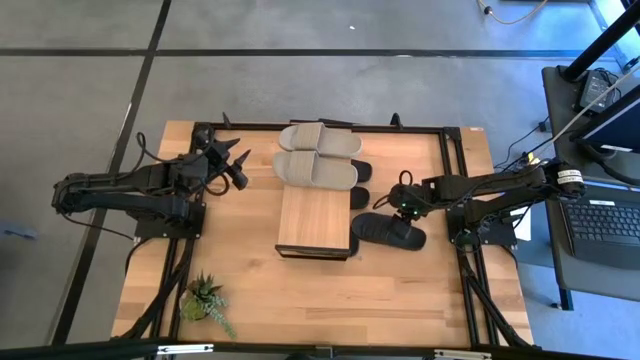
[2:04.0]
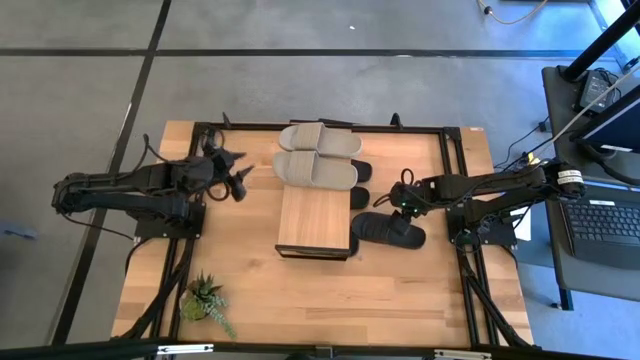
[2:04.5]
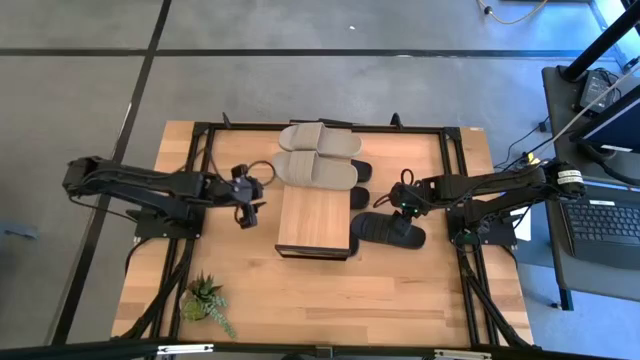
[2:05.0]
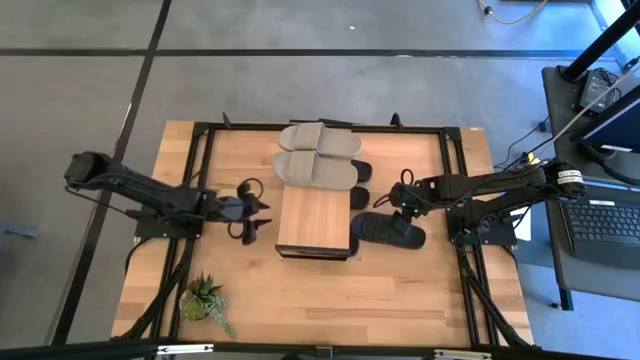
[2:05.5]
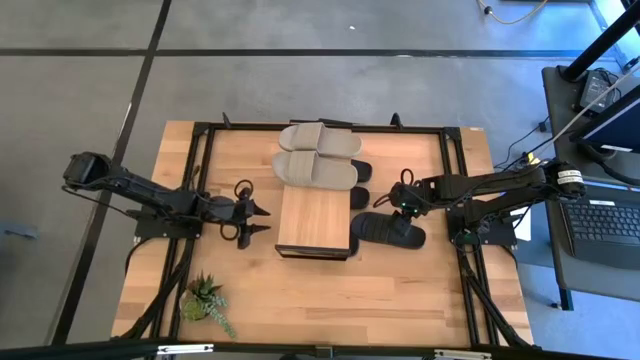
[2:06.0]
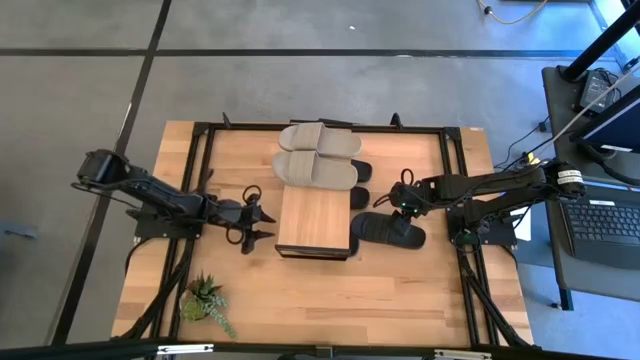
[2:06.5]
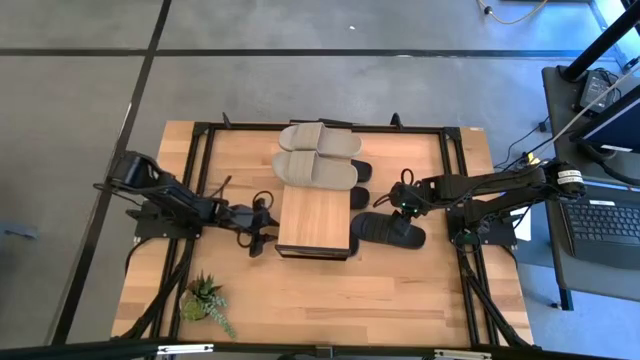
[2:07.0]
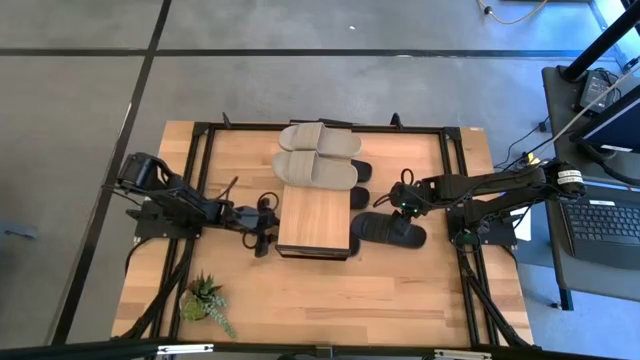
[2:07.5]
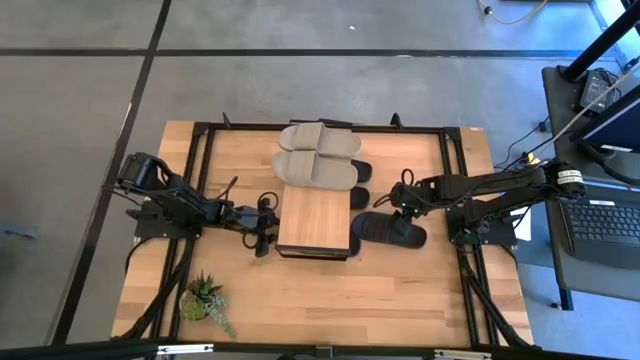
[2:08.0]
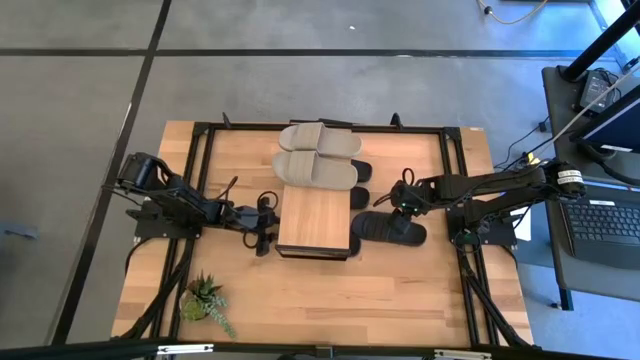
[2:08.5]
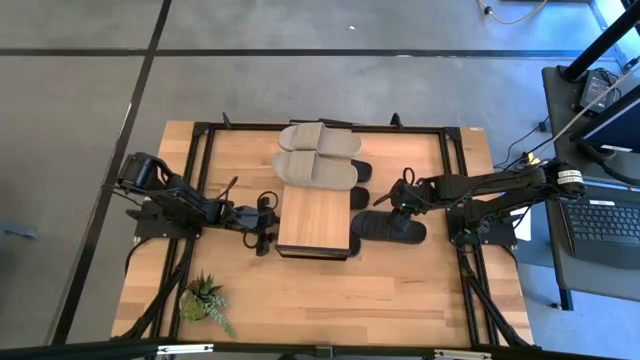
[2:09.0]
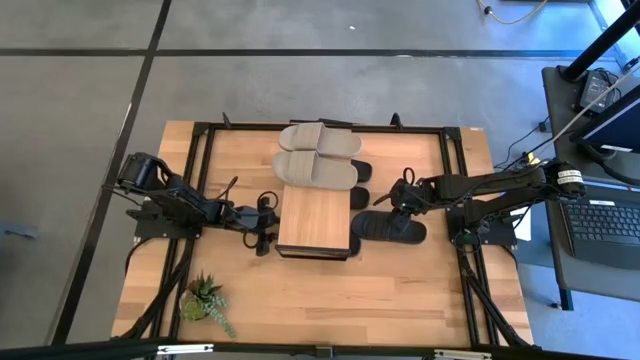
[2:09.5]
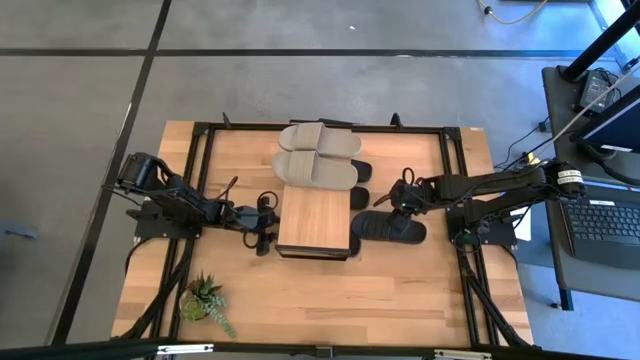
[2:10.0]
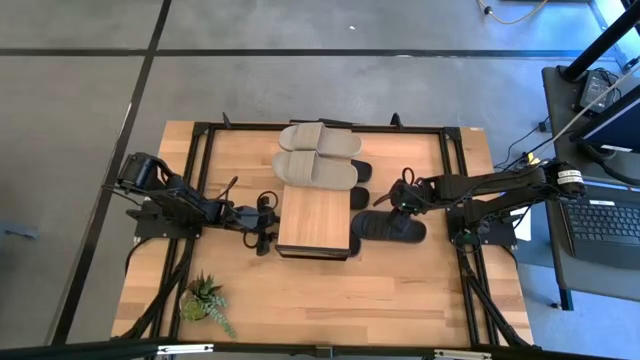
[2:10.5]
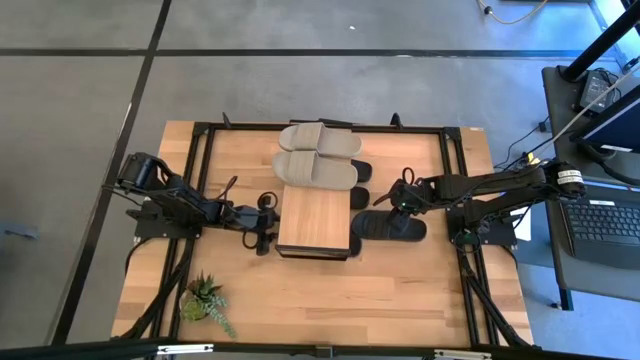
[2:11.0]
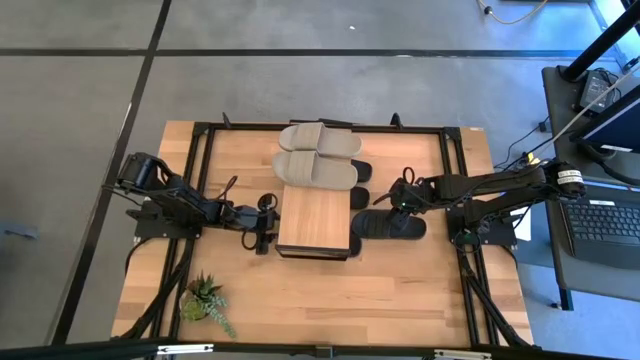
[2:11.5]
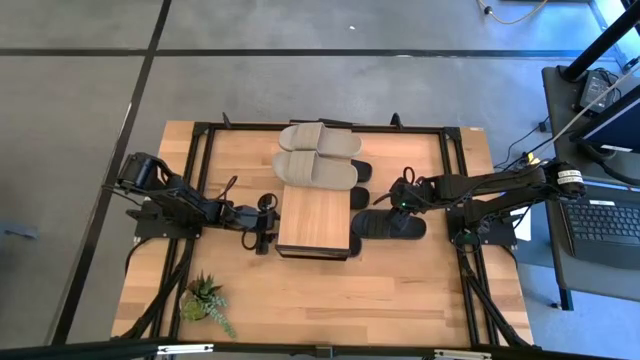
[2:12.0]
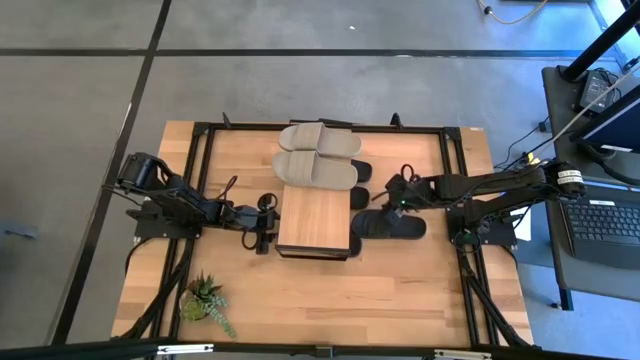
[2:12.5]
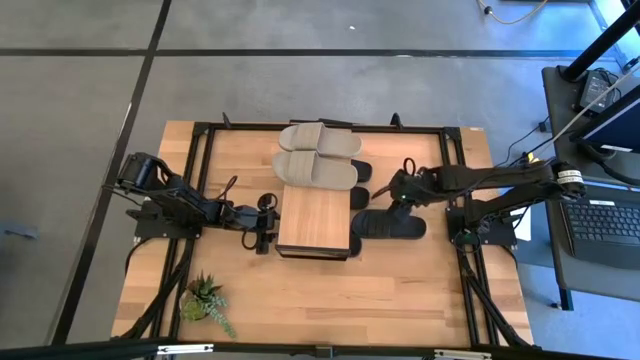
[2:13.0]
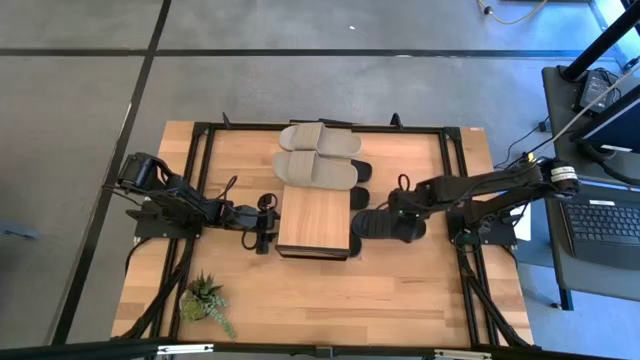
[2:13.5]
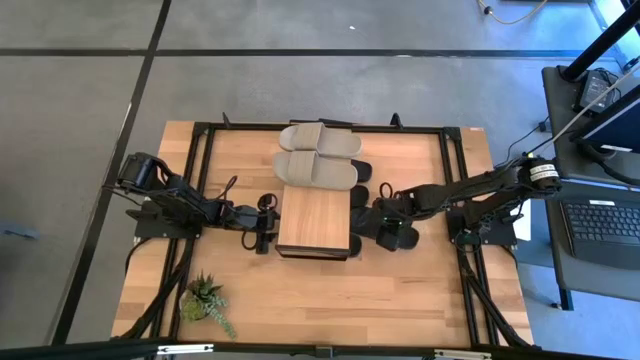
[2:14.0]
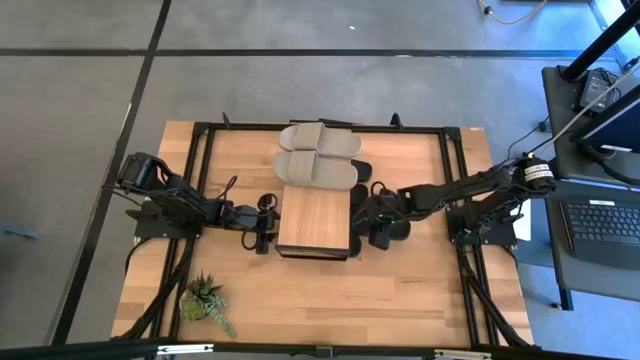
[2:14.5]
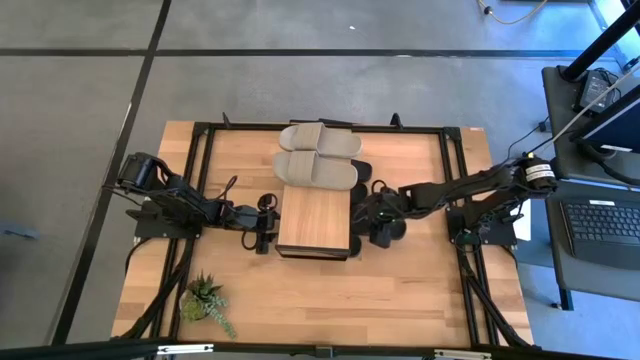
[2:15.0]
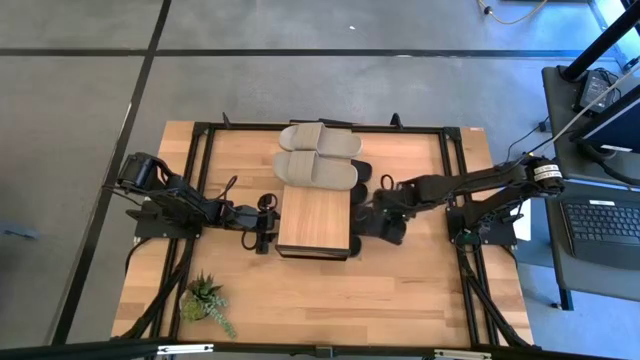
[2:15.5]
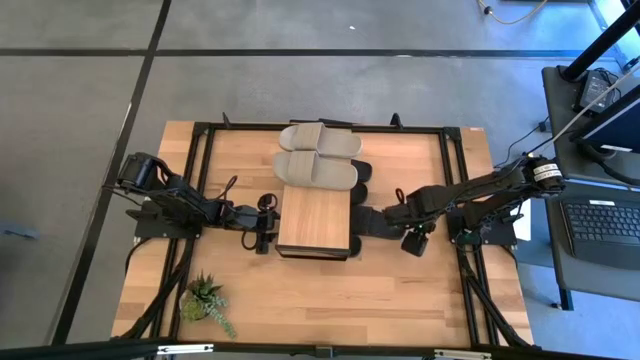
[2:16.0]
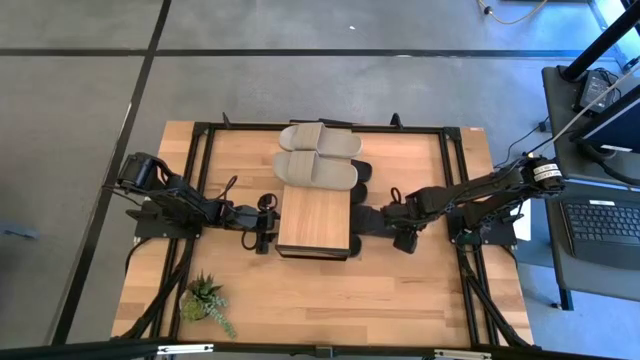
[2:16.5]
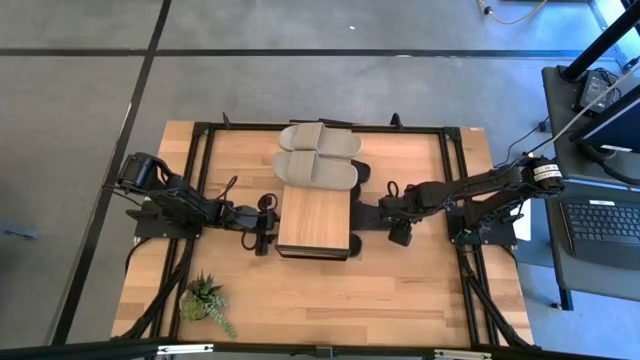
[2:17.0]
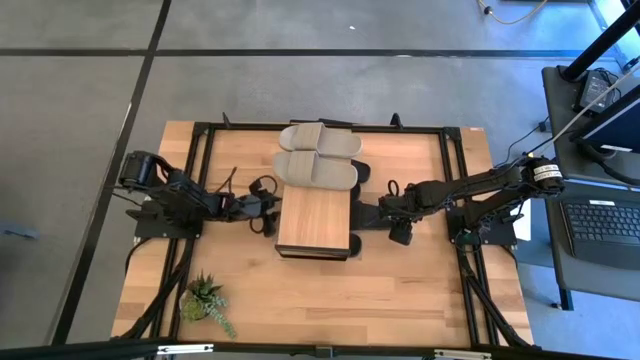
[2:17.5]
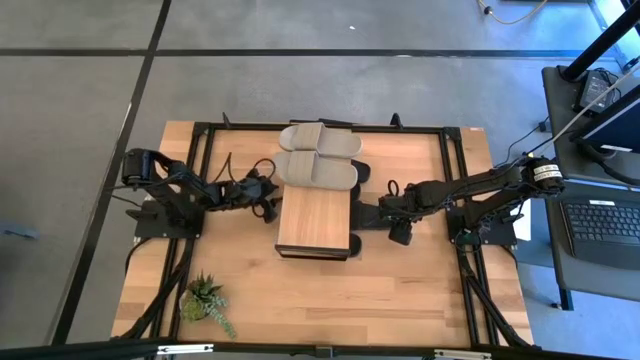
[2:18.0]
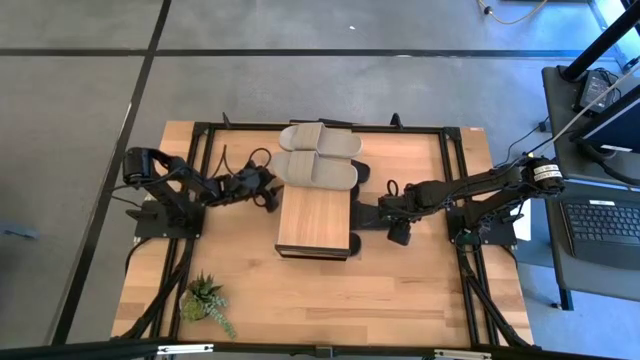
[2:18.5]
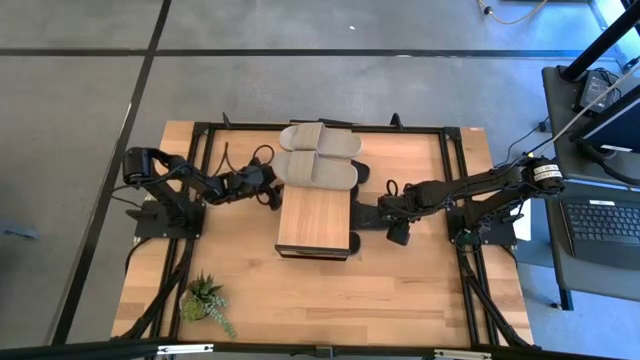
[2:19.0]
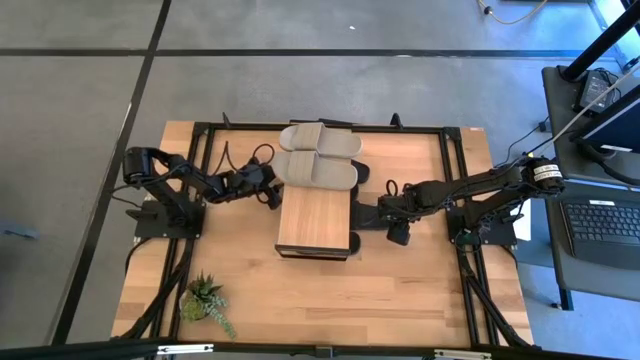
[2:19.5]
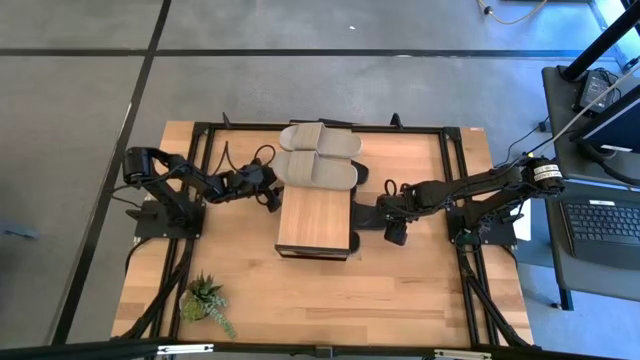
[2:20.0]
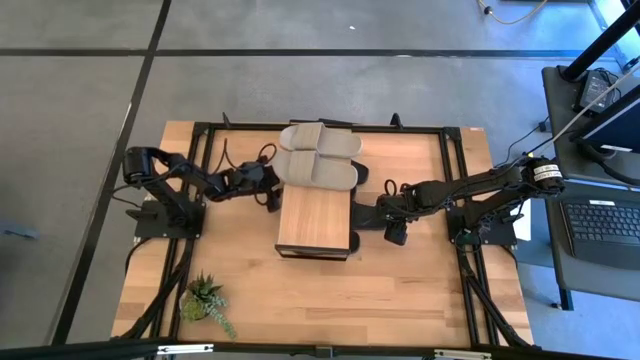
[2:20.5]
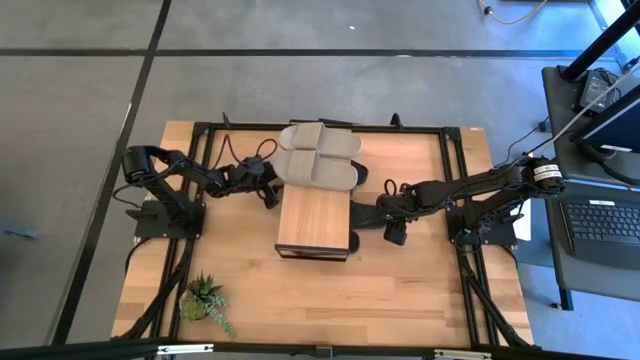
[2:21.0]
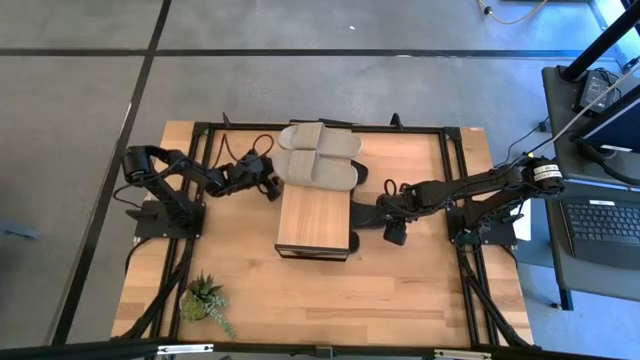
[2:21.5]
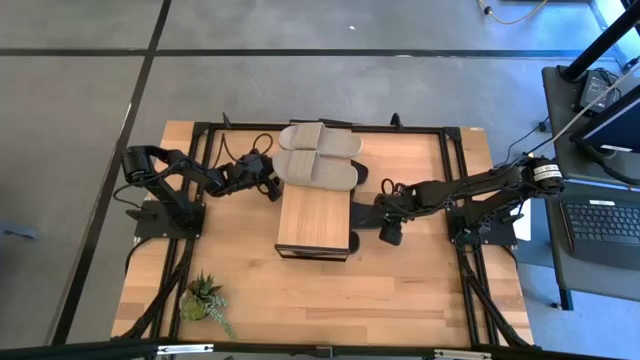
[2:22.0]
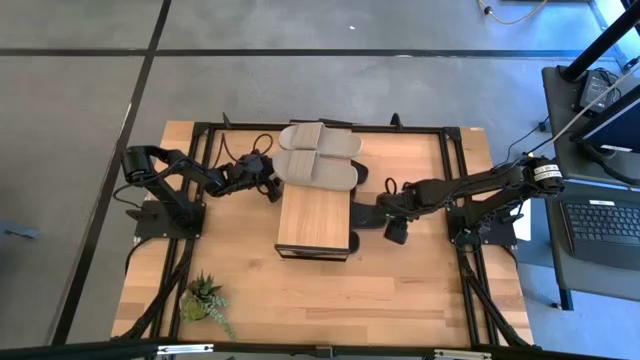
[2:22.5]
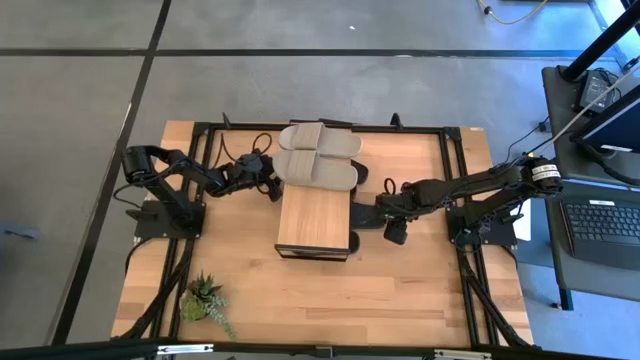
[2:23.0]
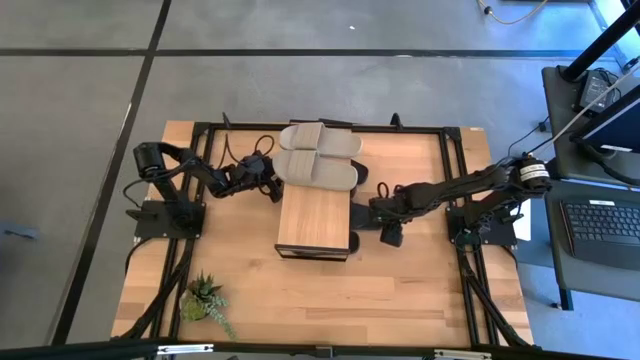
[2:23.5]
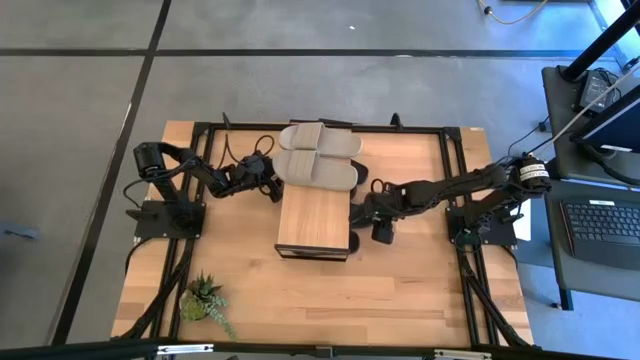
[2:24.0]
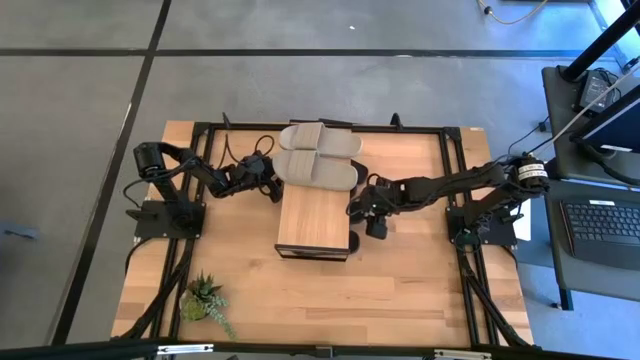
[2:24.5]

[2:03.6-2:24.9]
Task: Pick and place slides into the shelf
Put the black slide under the shelf
